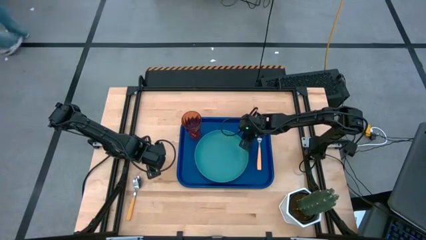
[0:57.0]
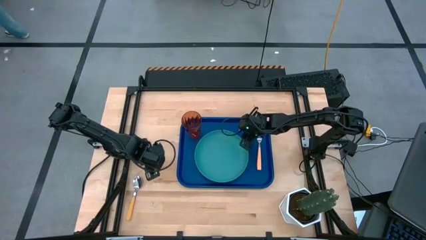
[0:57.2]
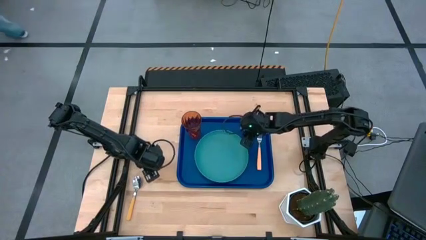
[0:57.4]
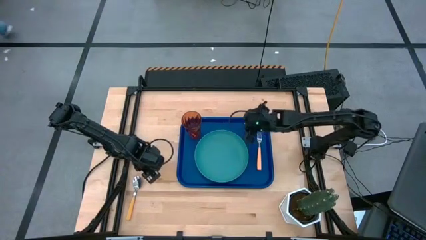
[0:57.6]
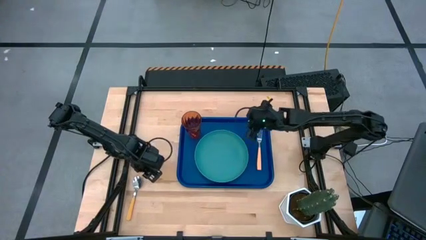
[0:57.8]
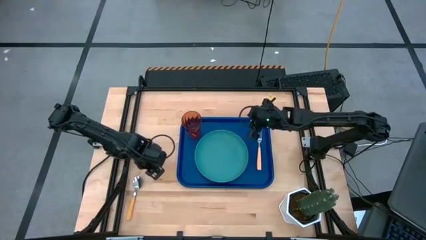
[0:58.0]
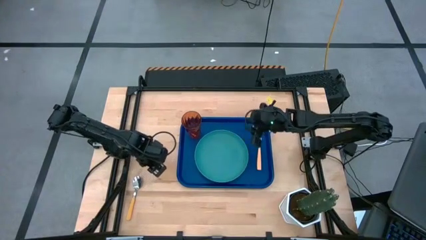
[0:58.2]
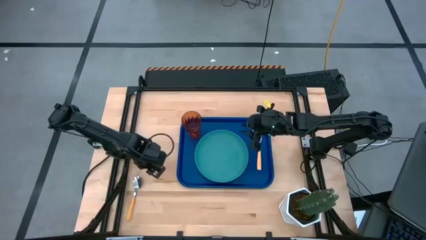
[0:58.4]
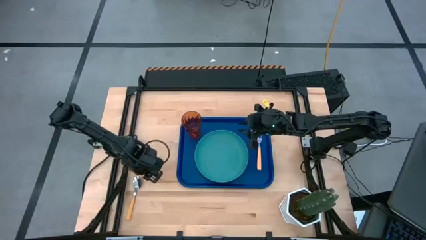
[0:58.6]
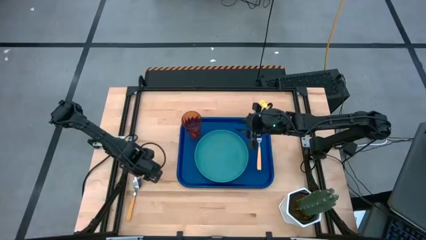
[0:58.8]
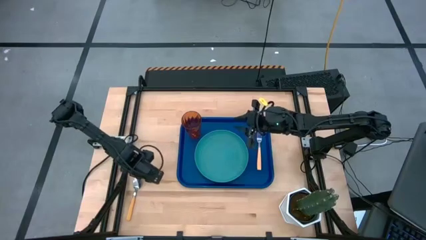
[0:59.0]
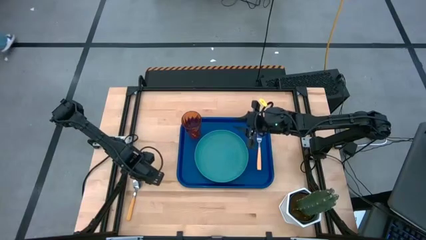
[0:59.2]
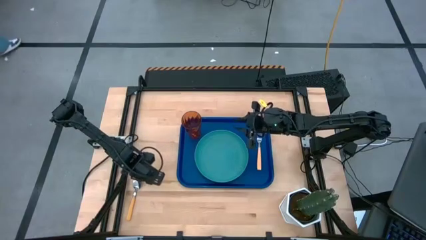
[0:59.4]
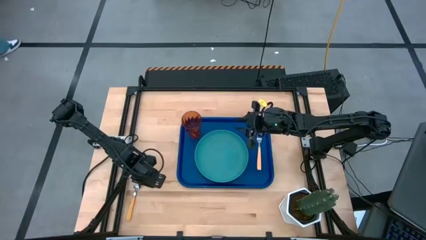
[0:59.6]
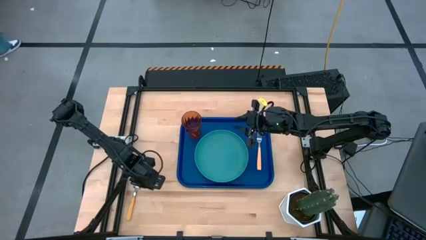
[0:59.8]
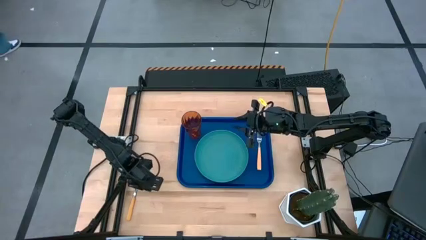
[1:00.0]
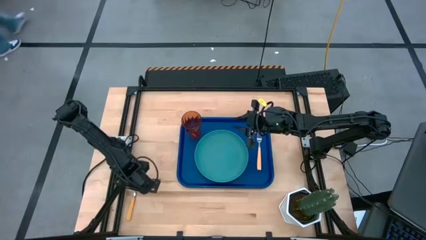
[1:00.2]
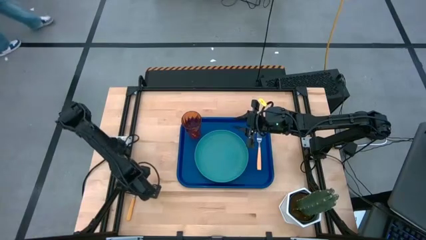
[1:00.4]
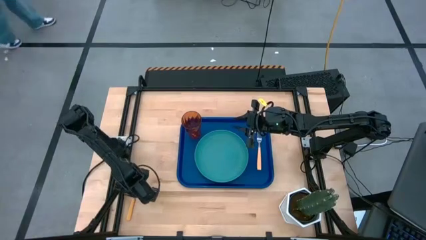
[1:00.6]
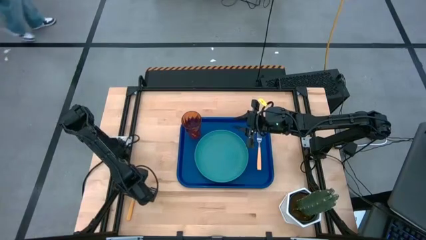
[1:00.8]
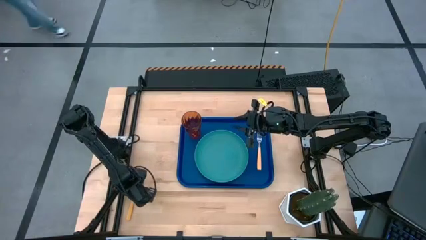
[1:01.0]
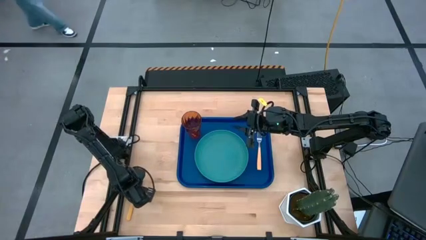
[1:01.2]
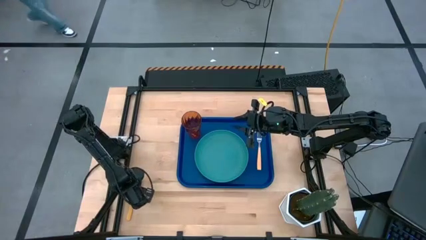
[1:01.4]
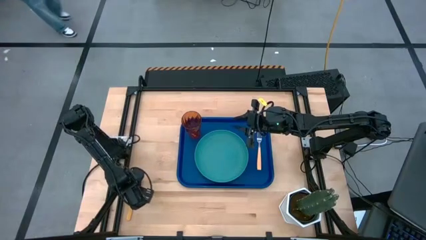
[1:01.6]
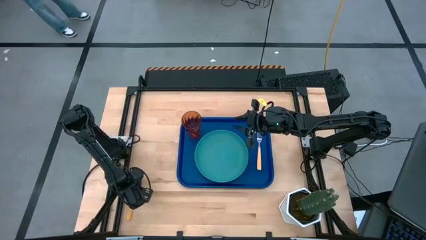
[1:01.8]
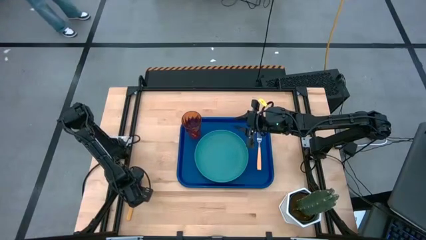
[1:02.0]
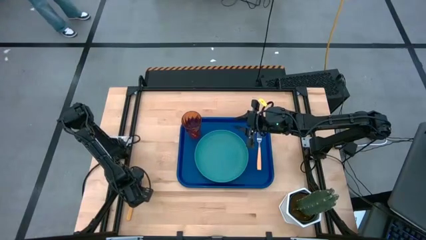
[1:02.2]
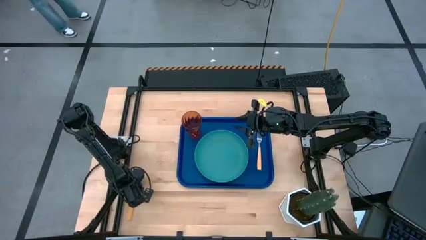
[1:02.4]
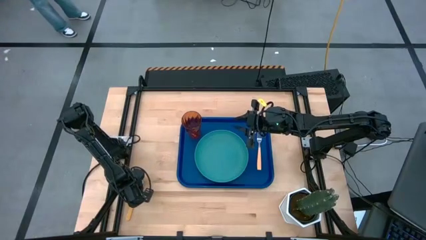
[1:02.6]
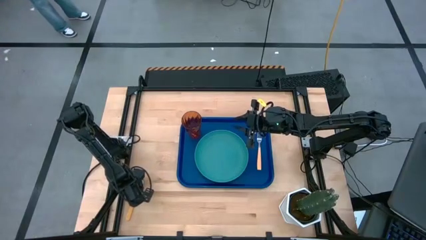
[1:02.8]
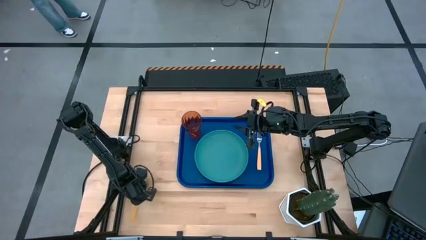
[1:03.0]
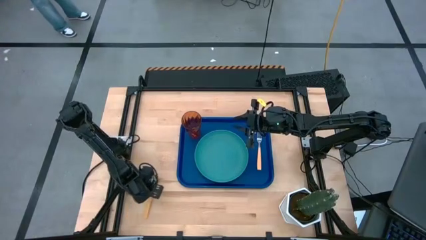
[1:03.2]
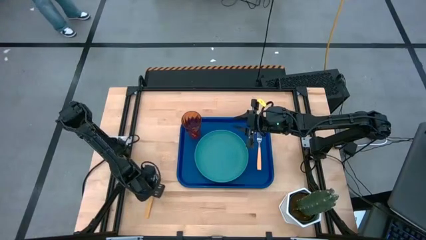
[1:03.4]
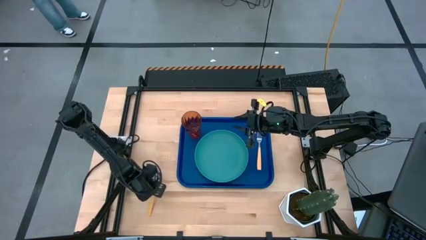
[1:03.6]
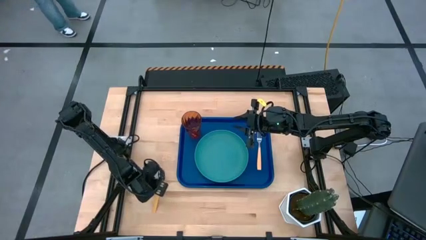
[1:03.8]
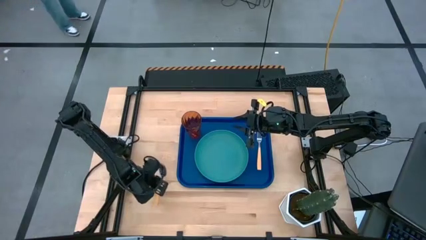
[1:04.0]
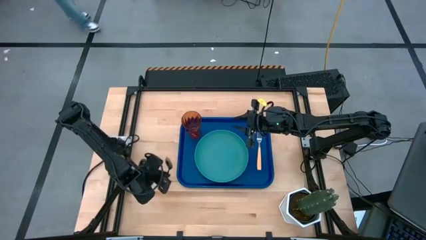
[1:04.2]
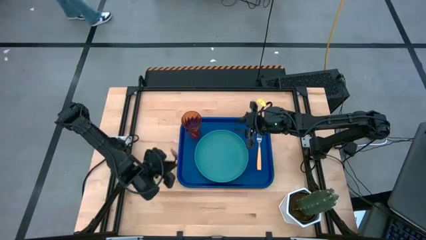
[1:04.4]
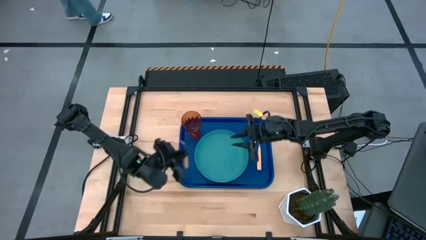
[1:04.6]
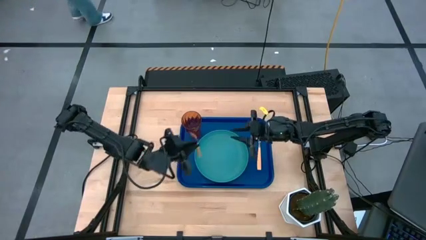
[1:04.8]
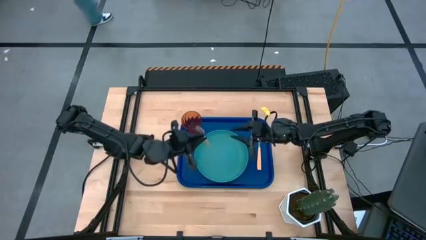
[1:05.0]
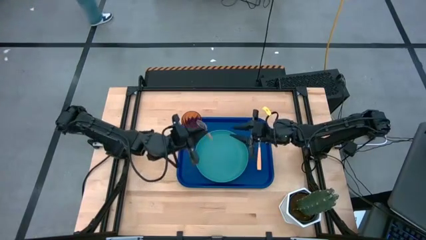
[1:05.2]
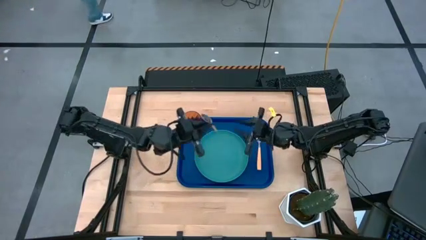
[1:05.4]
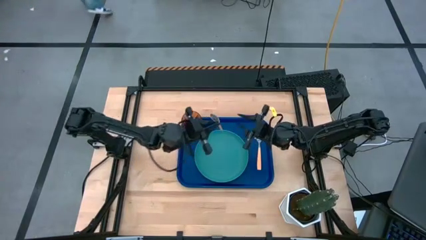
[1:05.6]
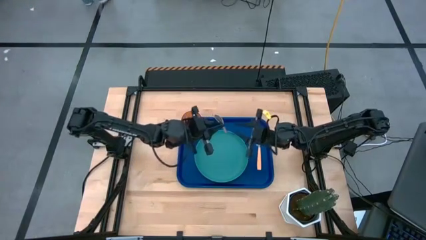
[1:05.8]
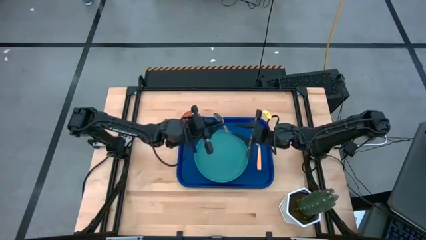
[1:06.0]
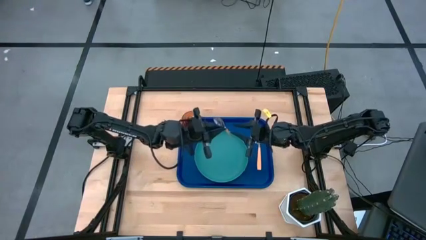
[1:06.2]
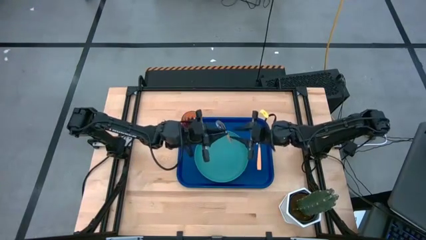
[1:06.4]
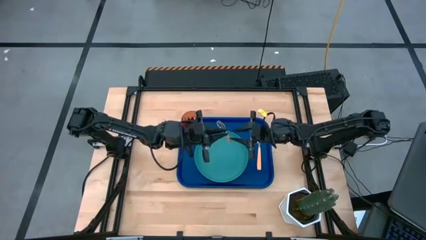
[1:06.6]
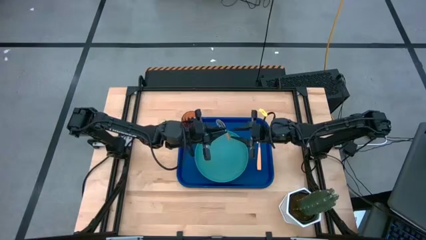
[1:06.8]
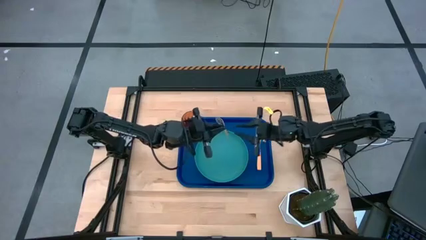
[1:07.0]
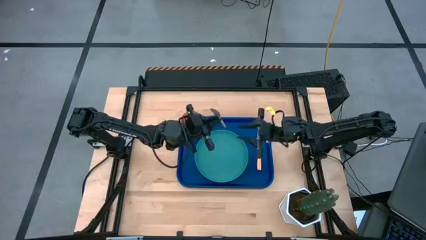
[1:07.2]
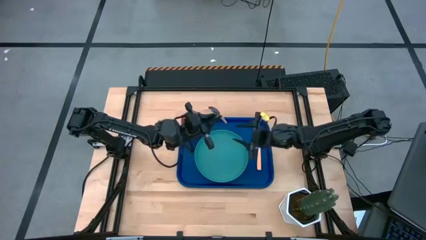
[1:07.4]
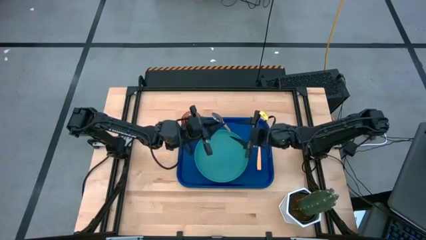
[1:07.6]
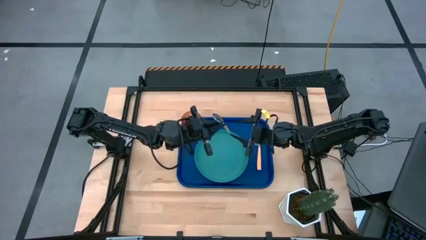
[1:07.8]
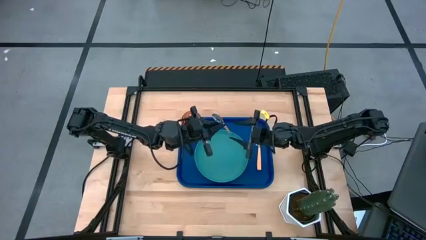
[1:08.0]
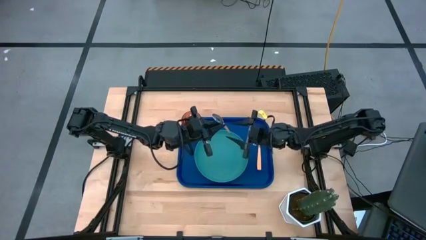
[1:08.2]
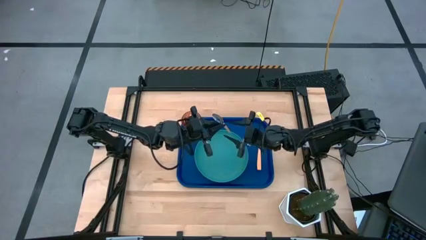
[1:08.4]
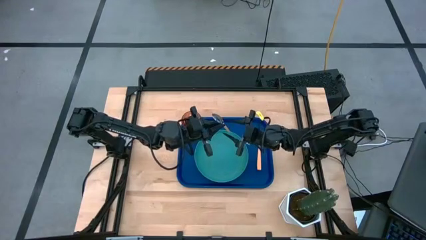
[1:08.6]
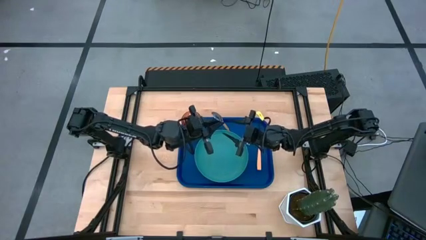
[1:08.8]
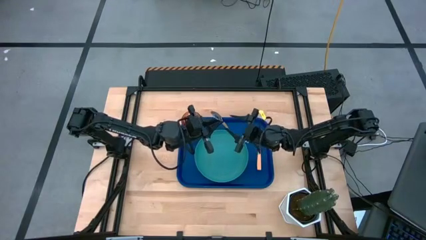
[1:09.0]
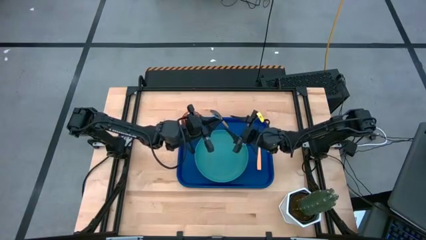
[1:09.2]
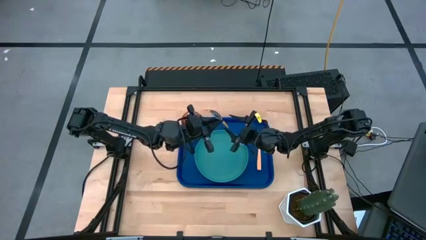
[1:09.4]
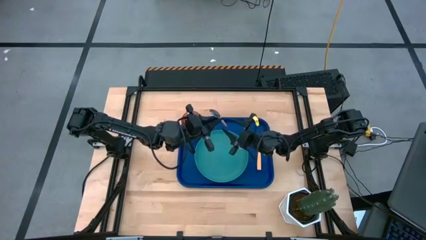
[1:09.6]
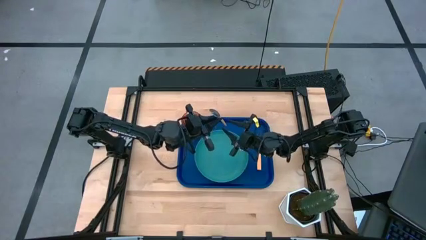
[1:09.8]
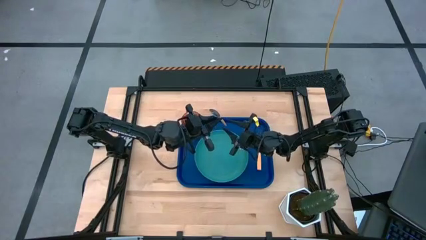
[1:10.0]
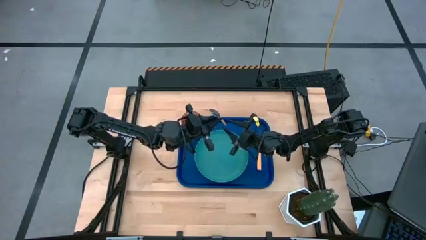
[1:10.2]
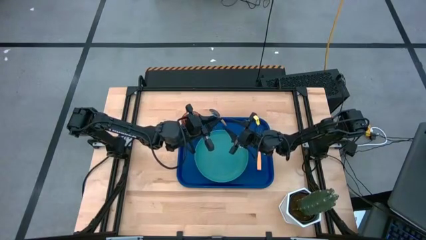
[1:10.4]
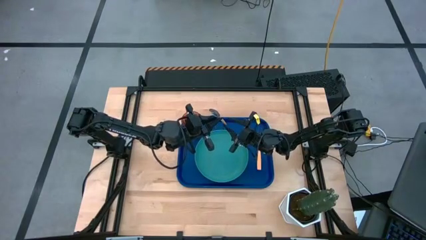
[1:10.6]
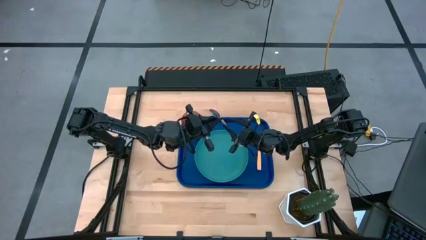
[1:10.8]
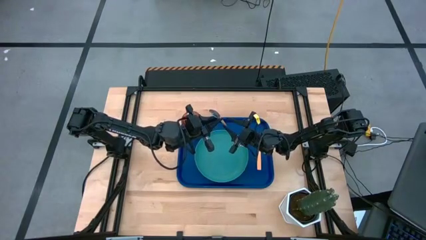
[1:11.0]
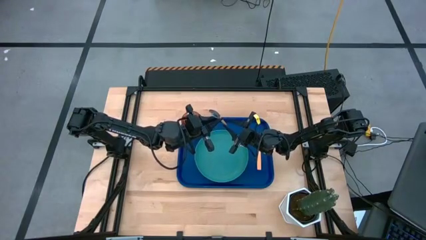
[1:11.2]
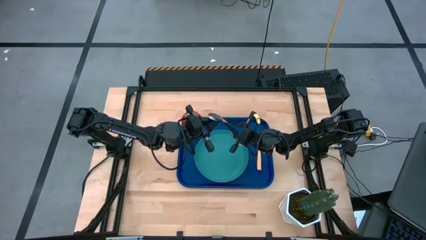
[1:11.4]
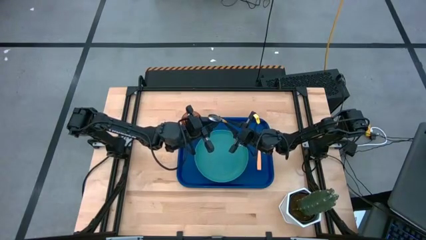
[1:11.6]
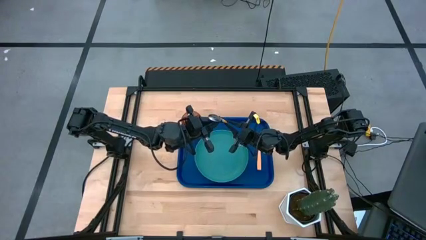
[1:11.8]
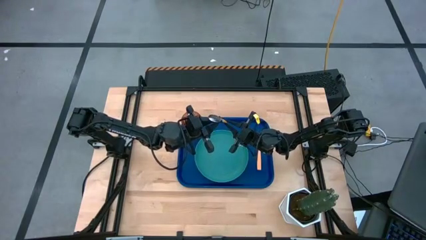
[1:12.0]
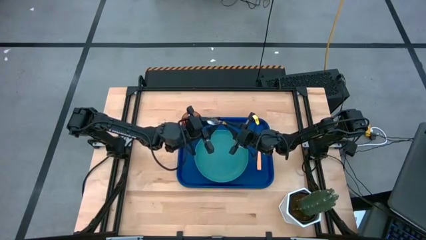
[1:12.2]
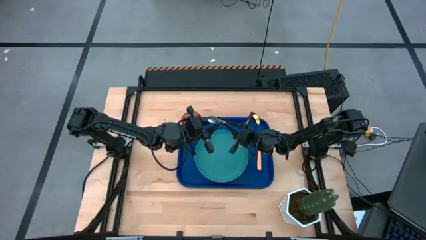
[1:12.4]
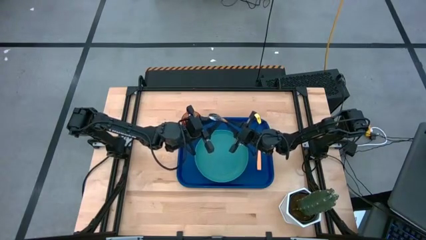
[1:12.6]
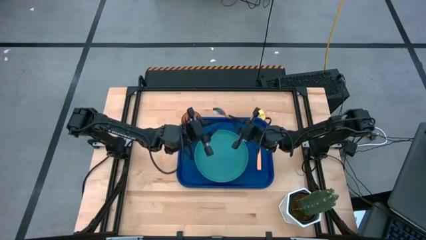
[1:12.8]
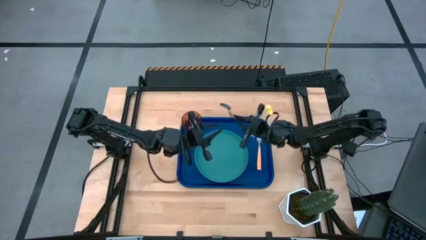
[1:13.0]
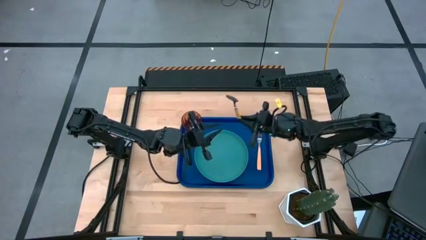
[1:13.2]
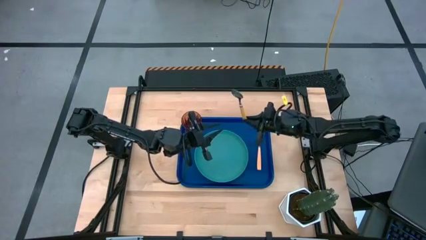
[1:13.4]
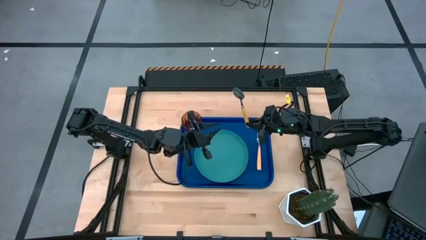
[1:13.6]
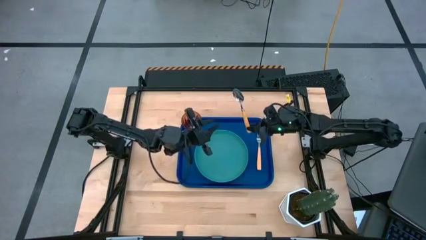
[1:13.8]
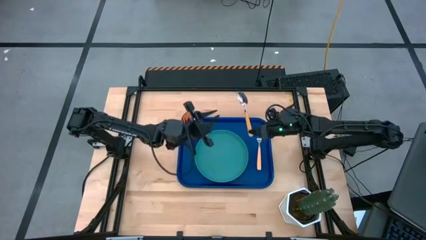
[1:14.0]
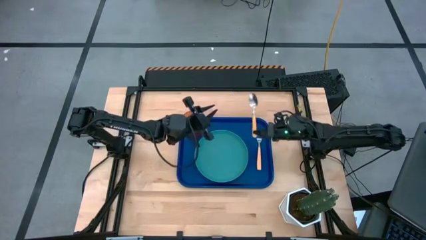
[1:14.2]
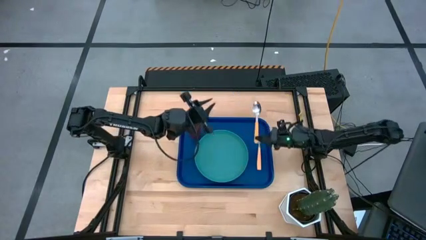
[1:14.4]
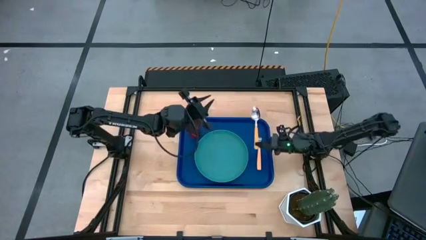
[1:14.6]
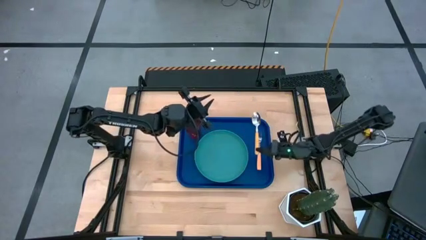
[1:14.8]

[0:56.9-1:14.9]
Task: Pick and place plate/cup/fork/spoon on tray
Put the orange spoon on the blue tray to the right of the yellow fork
